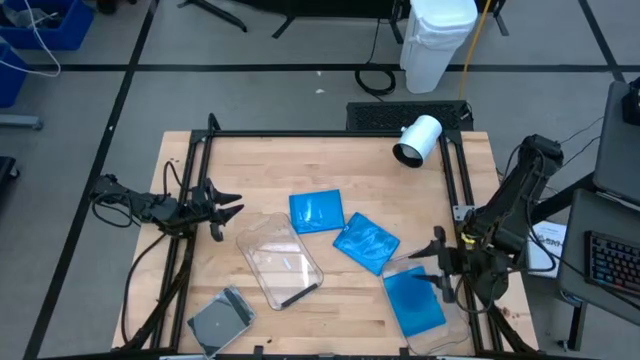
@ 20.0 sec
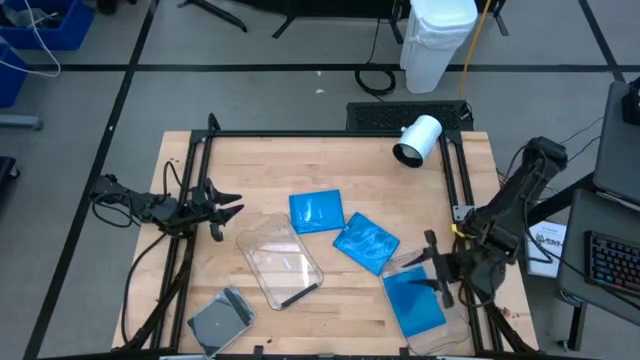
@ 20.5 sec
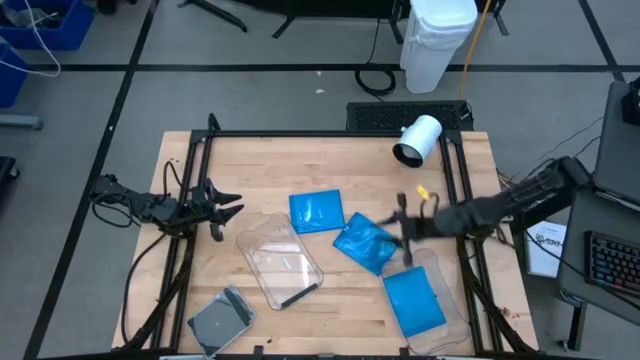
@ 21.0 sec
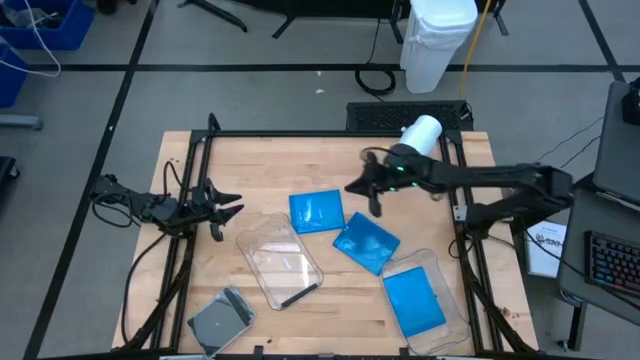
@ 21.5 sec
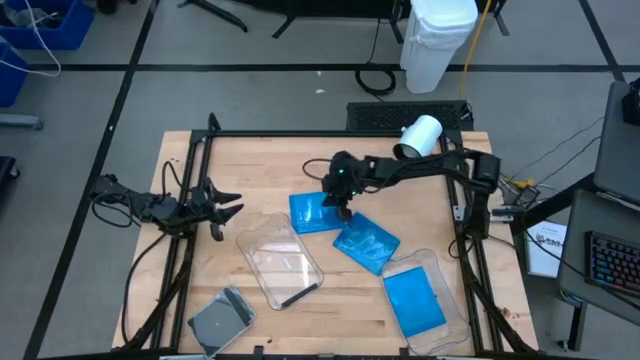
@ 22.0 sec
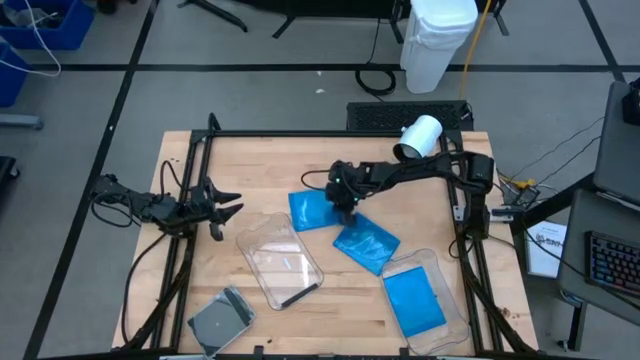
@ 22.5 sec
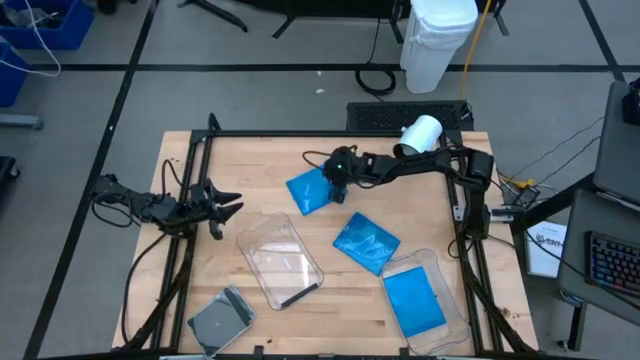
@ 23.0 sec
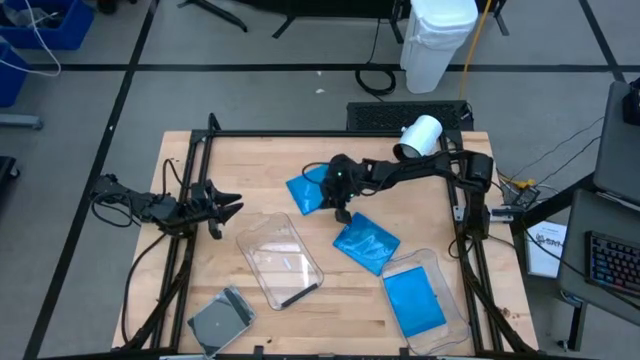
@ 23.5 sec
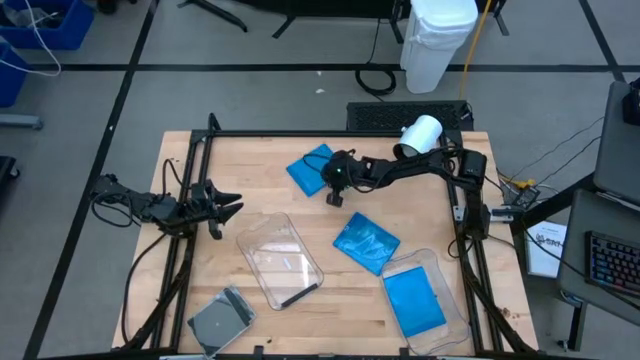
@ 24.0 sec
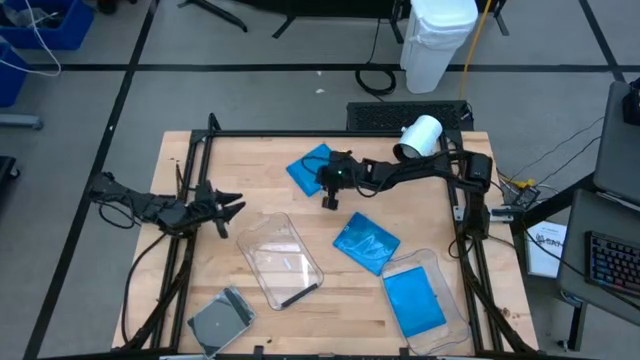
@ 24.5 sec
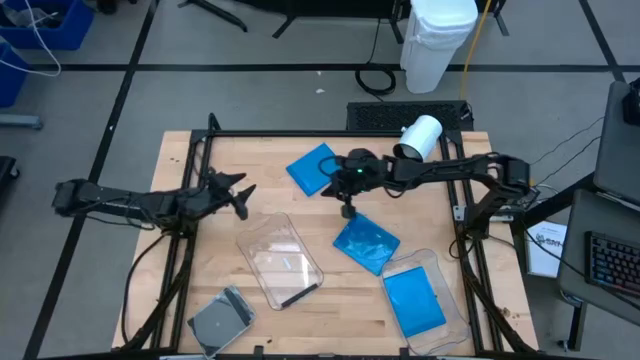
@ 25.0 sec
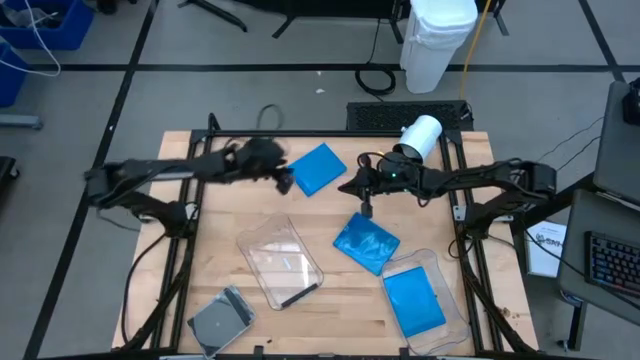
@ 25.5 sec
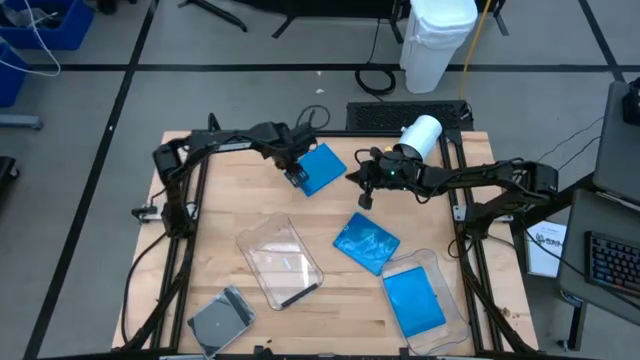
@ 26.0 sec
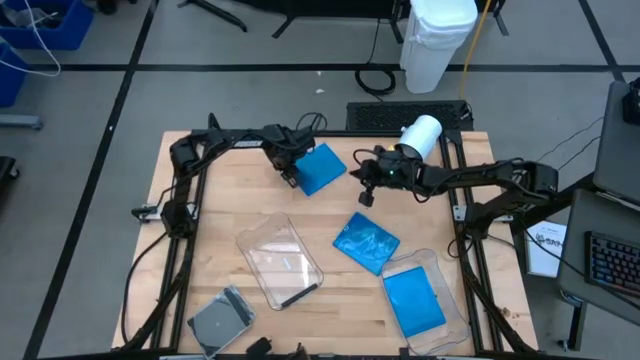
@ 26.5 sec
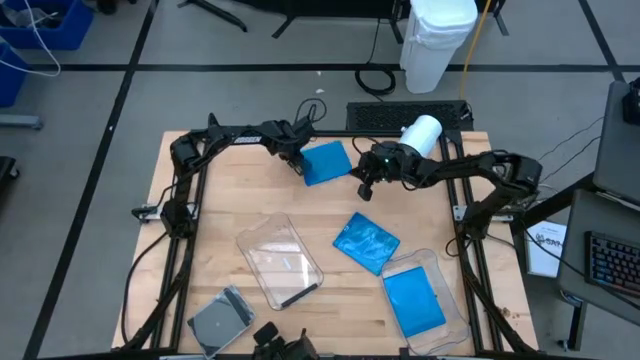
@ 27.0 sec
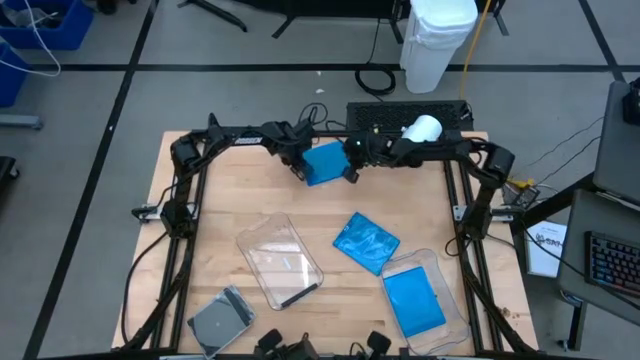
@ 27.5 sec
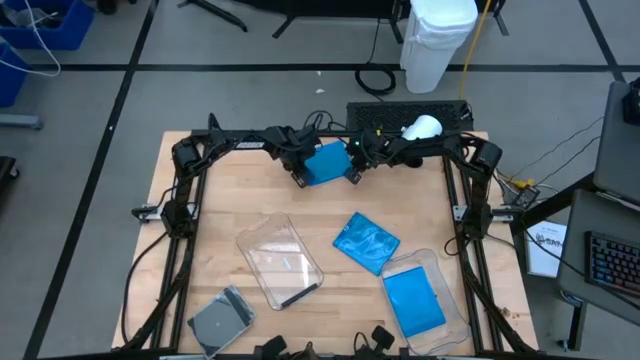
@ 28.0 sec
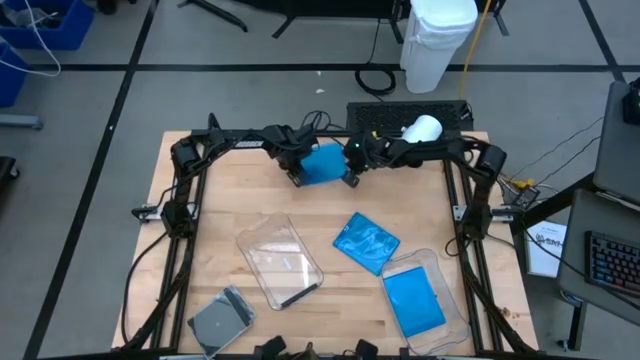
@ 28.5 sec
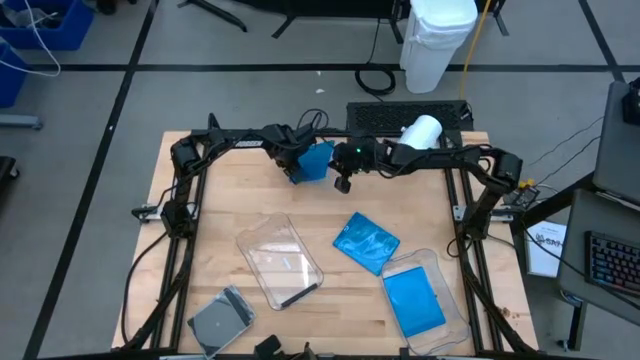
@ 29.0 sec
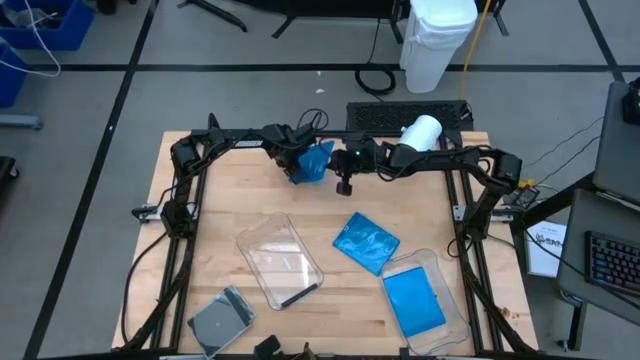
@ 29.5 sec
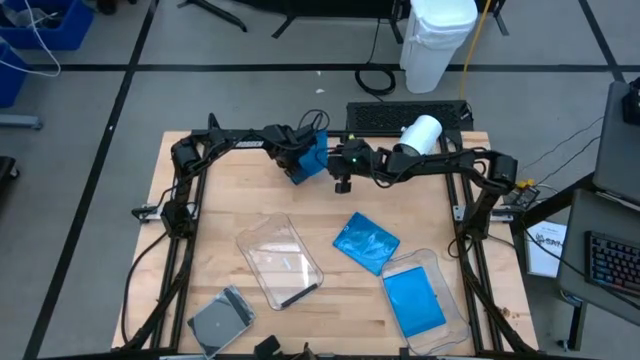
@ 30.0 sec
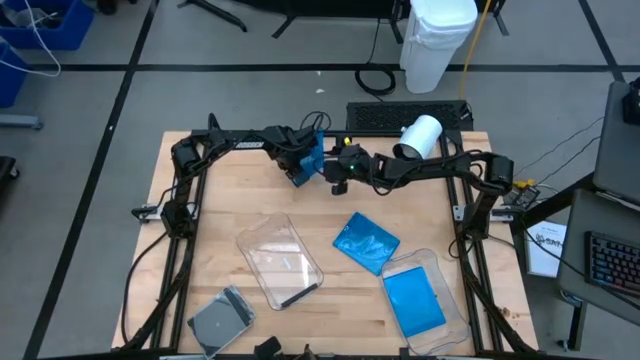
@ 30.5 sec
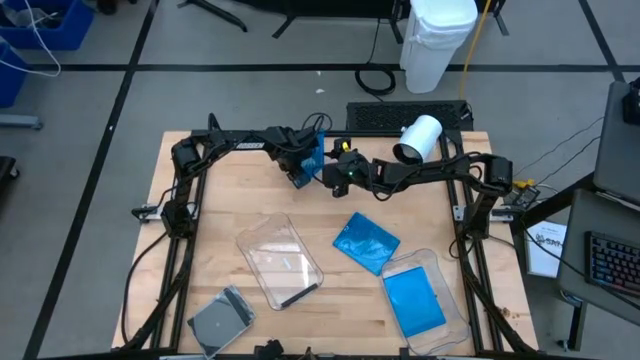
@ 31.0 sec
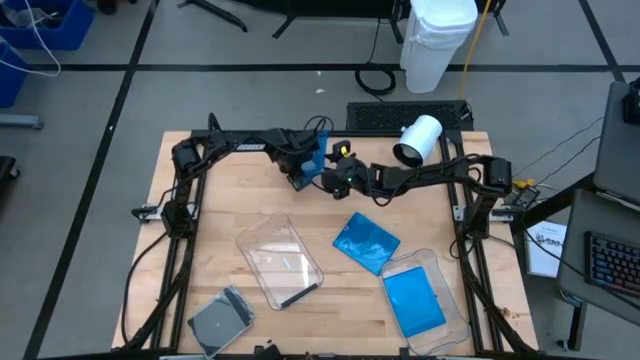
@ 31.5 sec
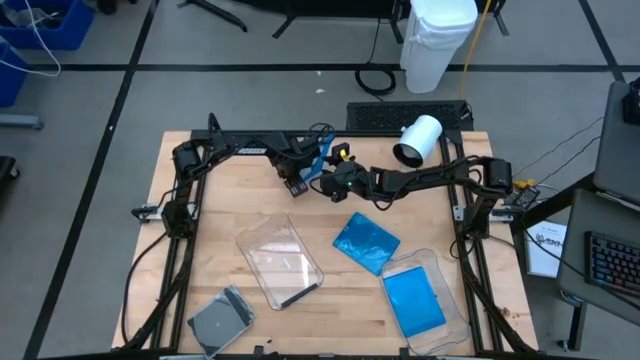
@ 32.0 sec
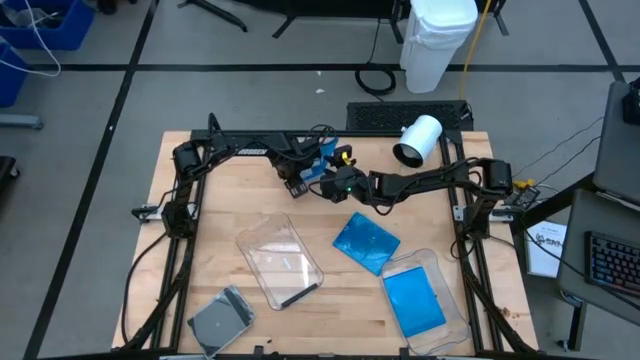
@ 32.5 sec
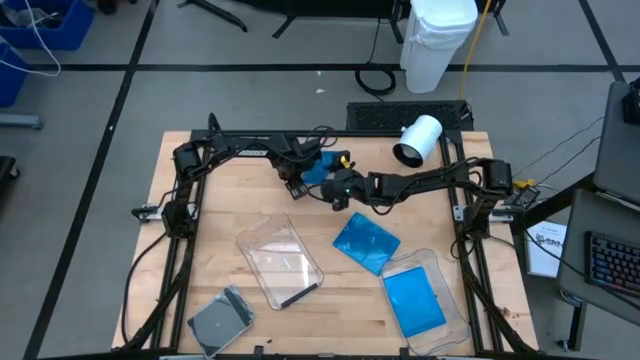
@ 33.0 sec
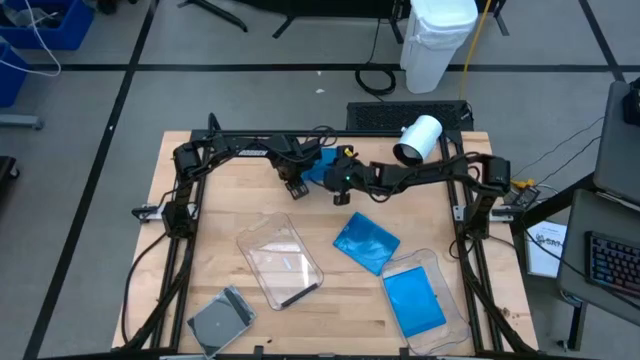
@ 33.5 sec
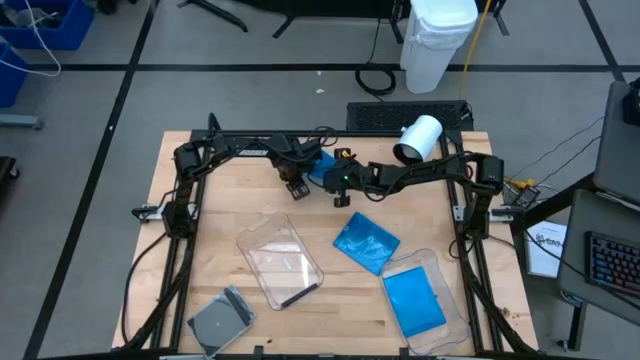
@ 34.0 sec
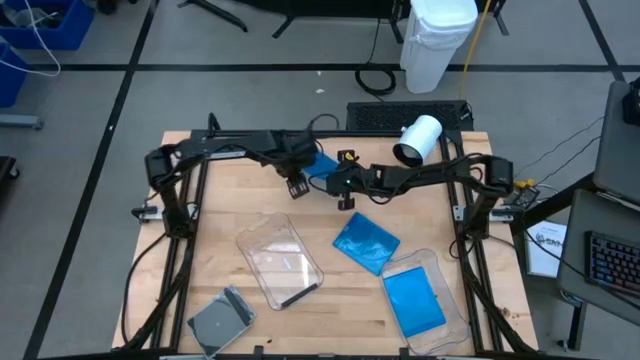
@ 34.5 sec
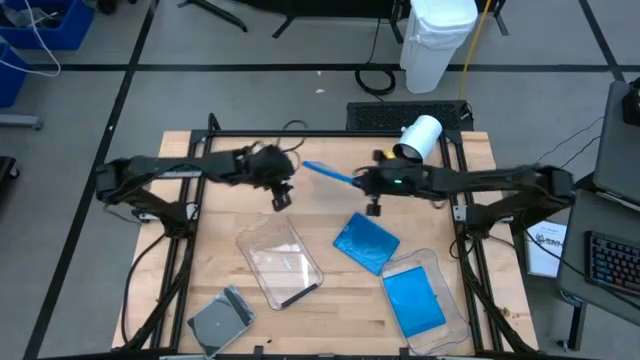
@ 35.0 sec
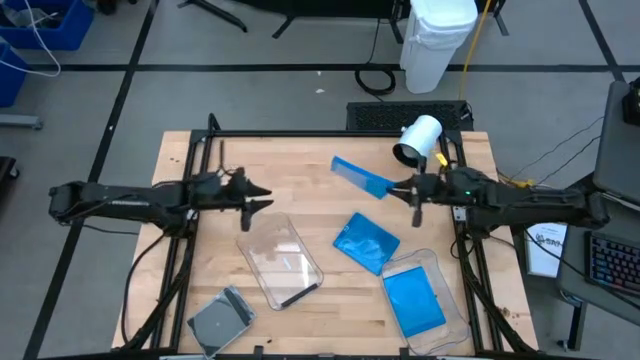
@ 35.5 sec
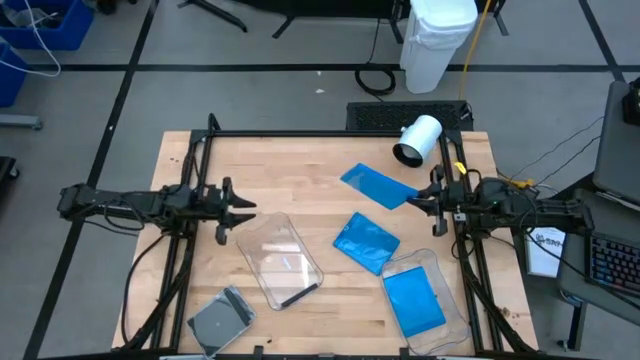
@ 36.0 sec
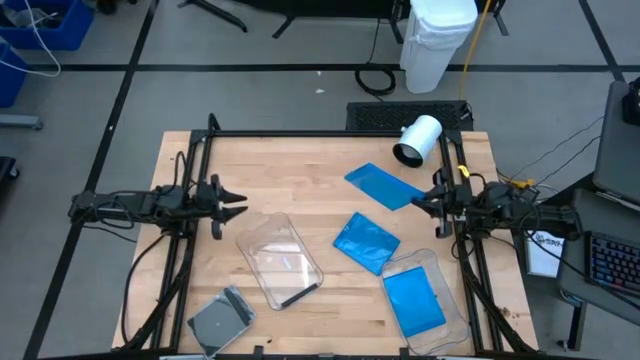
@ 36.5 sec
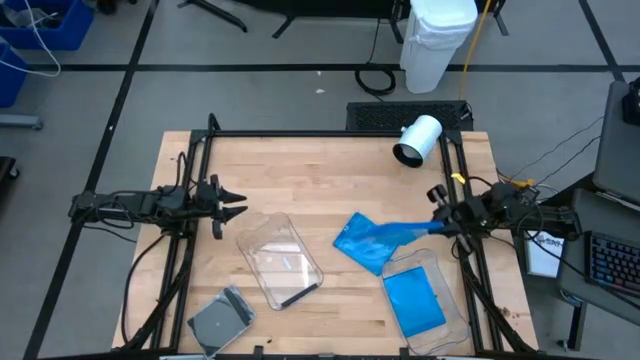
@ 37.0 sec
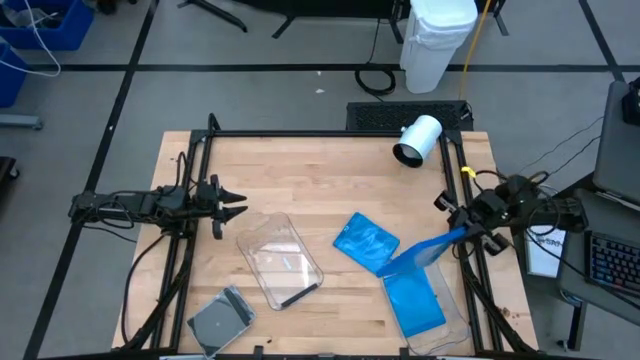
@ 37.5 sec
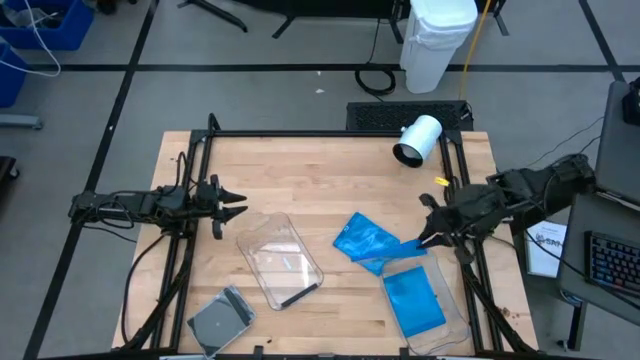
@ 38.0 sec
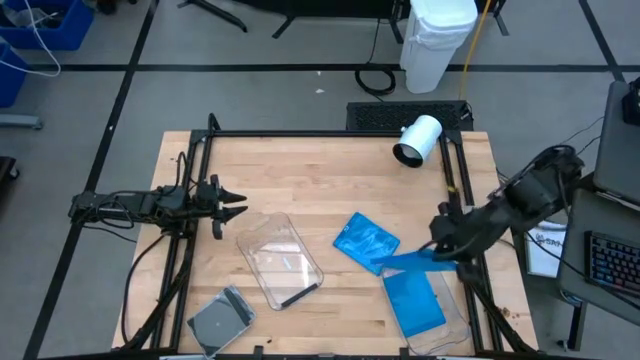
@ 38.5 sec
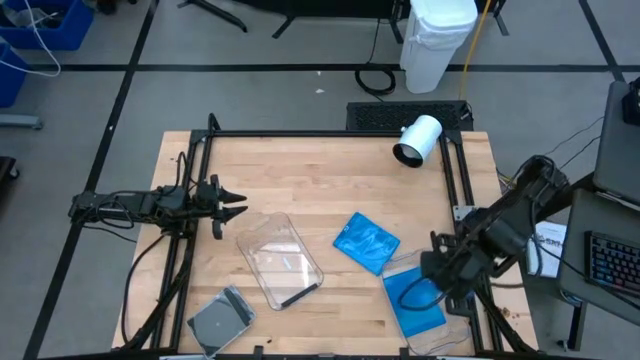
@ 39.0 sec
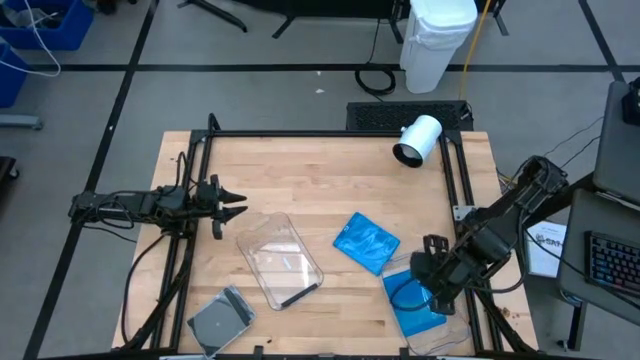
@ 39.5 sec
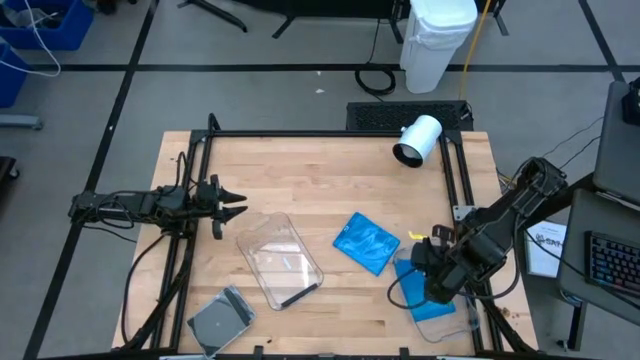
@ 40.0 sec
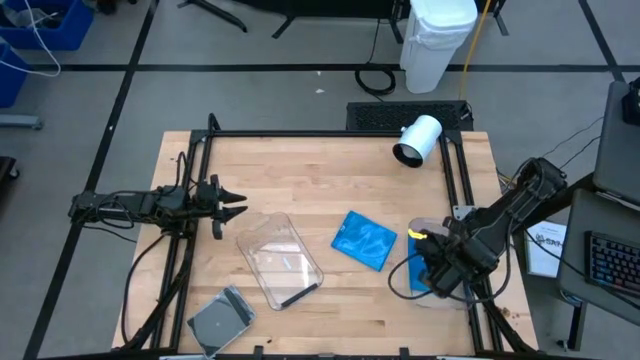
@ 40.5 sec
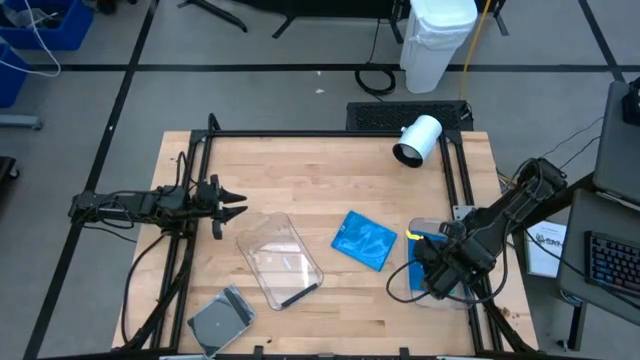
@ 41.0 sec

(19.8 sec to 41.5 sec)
Task: Pick & place jewel cases by type
Put the top blue disc case into the right transparent bin
